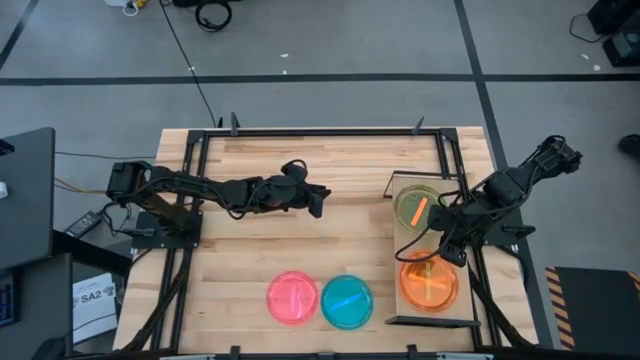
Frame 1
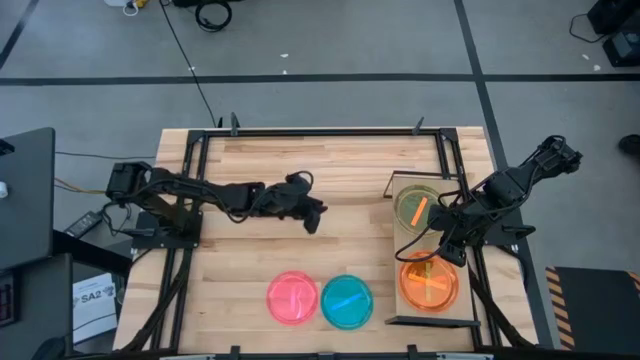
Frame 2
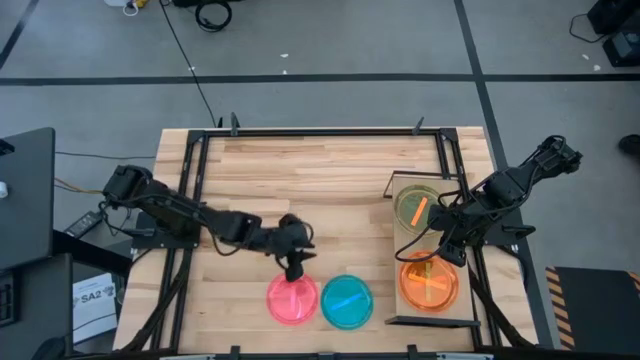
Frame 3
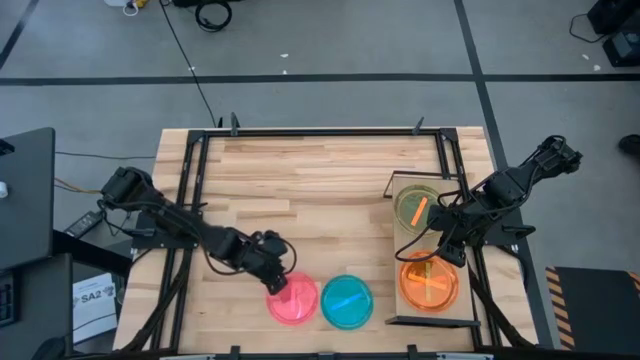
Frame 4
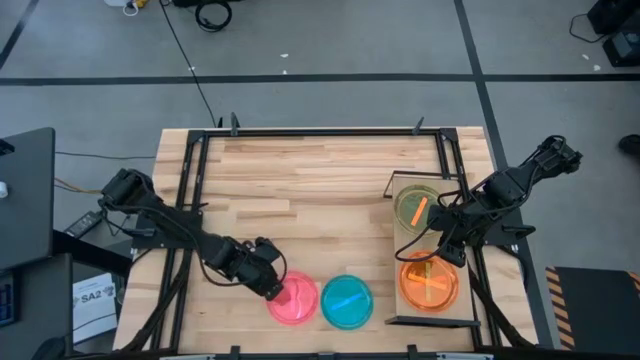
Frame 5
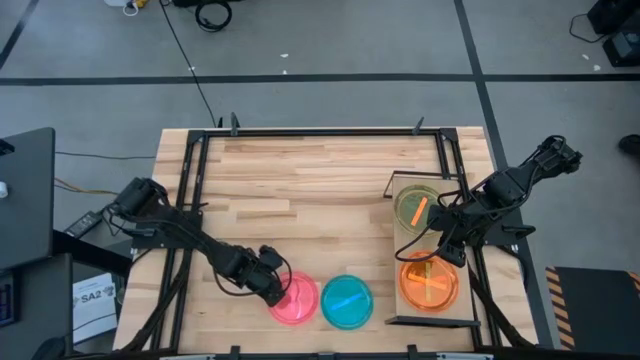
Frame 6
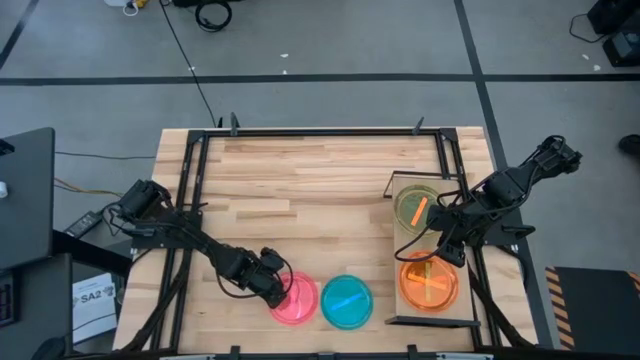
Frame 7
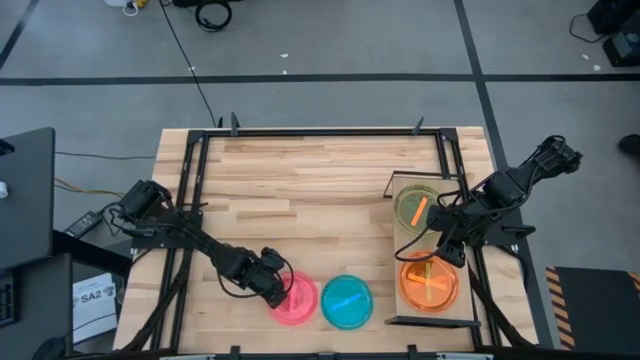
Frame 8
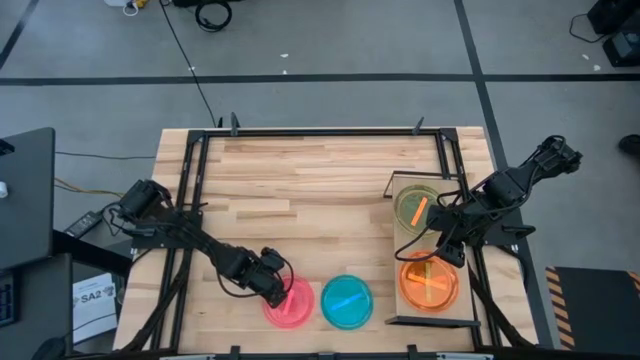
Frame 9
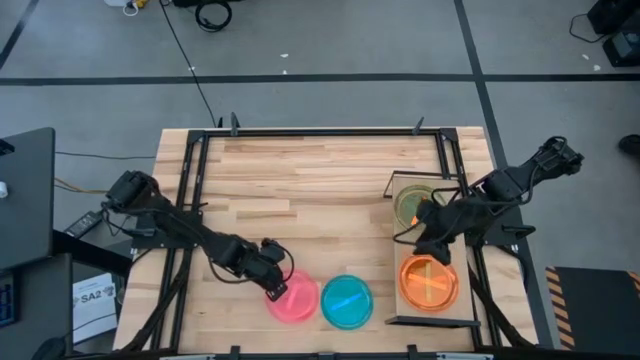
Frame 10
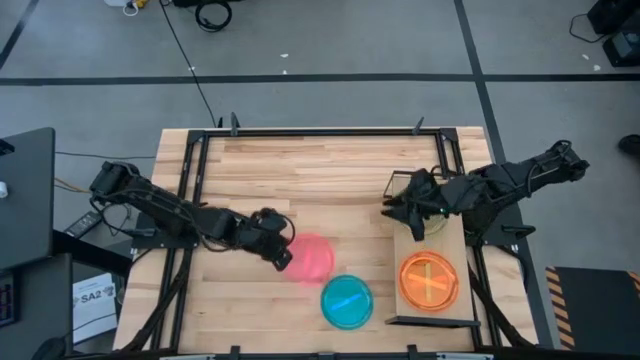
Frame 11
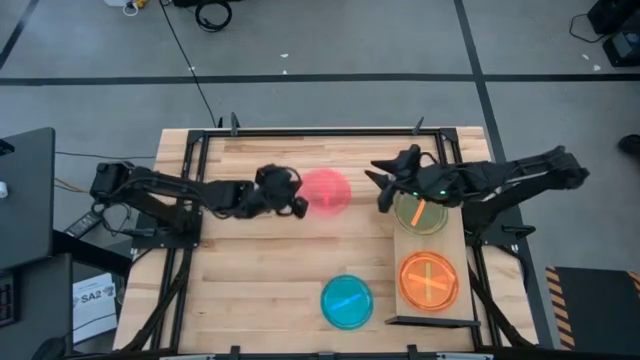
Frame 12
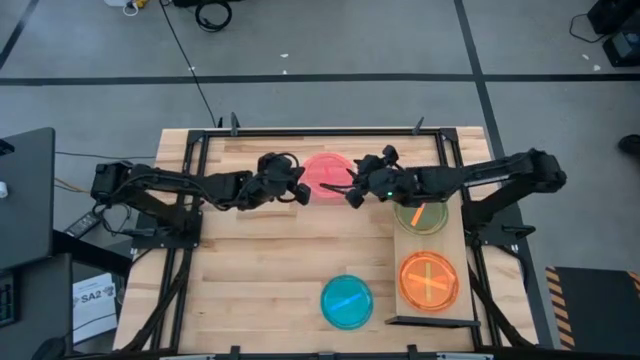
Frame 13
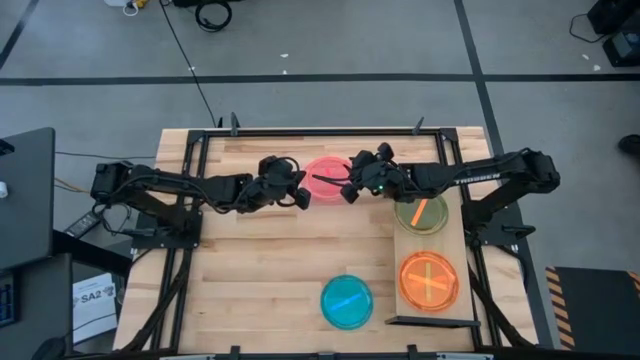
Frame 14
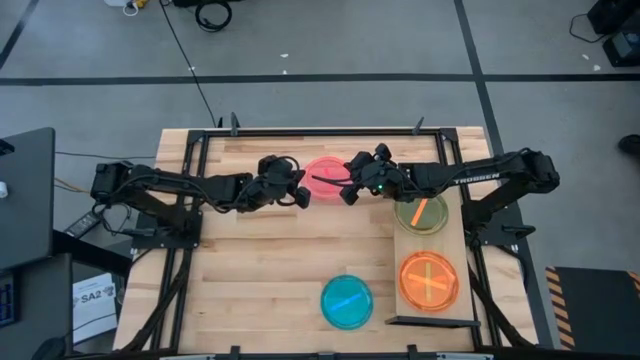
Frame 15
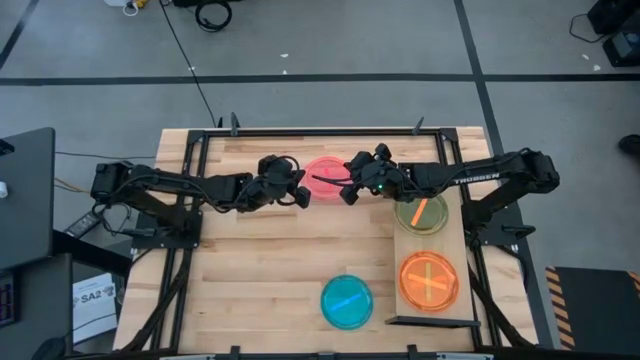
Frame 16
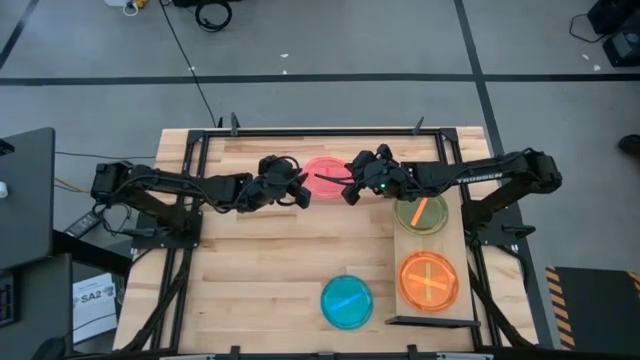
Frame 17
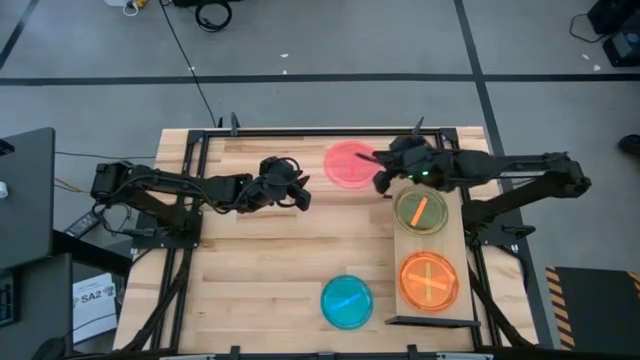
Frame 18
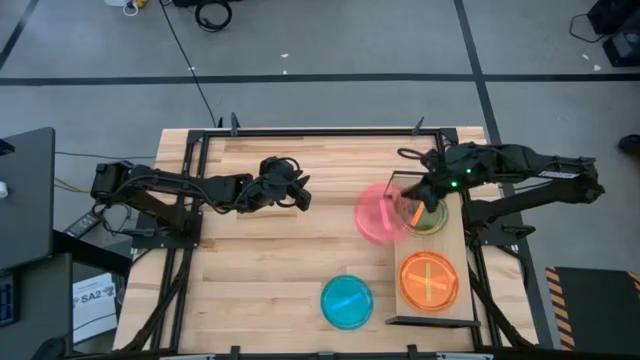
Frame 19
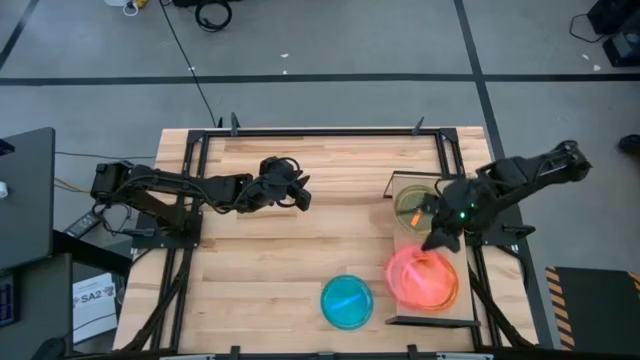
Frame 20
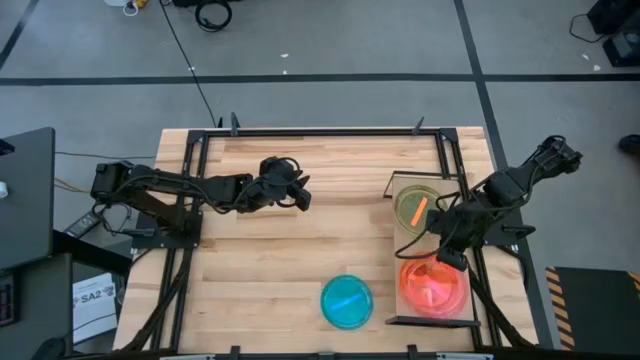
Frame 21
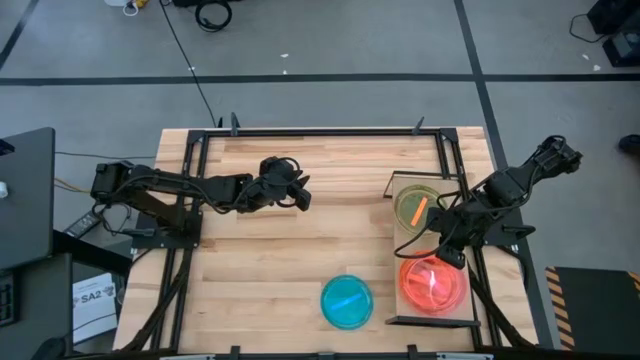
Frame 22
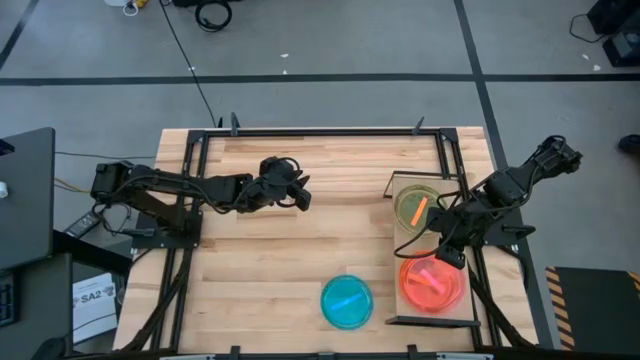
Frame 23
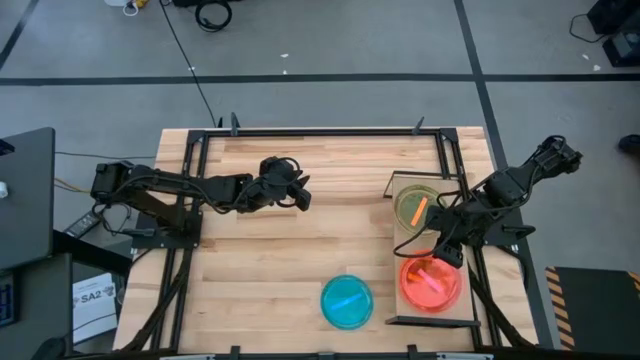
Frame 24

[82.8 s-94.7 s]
Task: Place and stack plates onto a shelf
Stack the pink transparent plate on top of the bottom orange transparent plate on the shelf

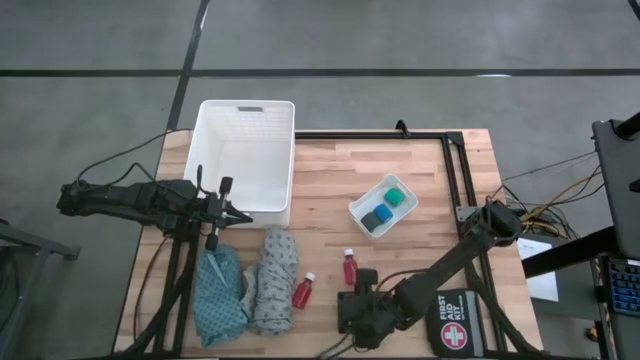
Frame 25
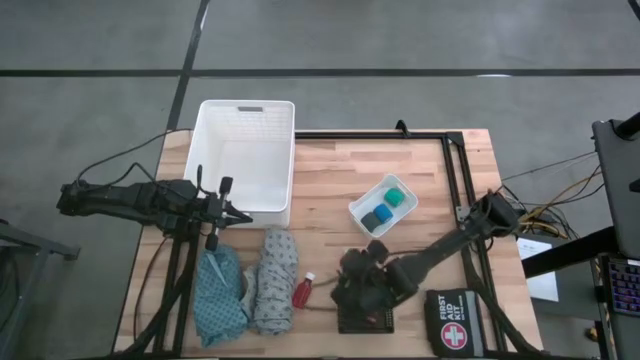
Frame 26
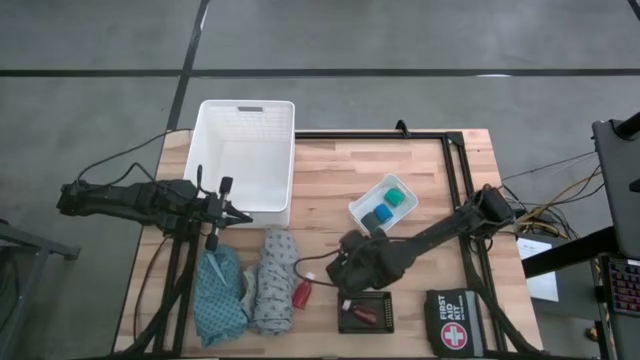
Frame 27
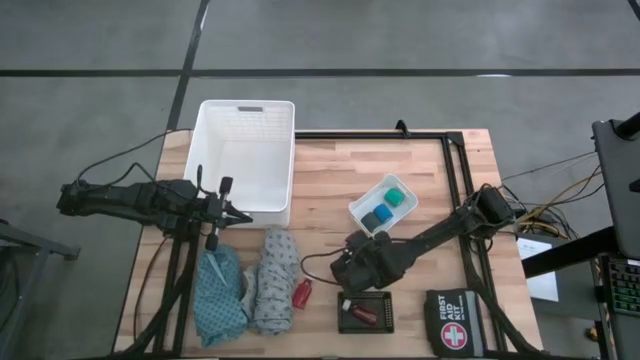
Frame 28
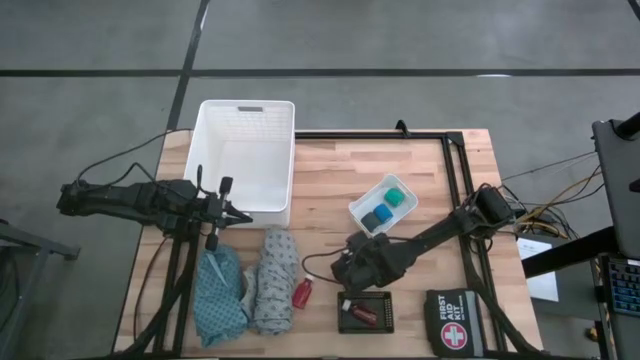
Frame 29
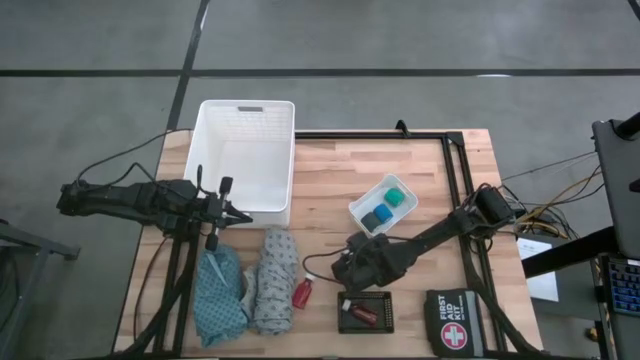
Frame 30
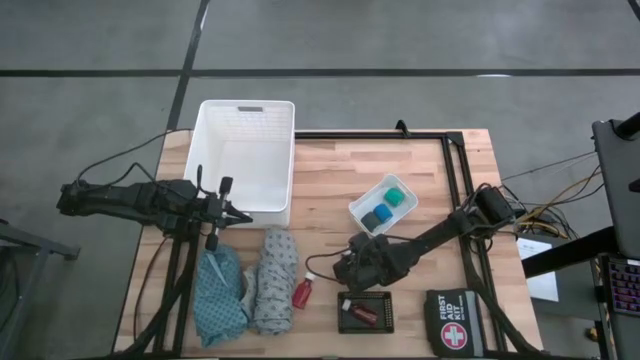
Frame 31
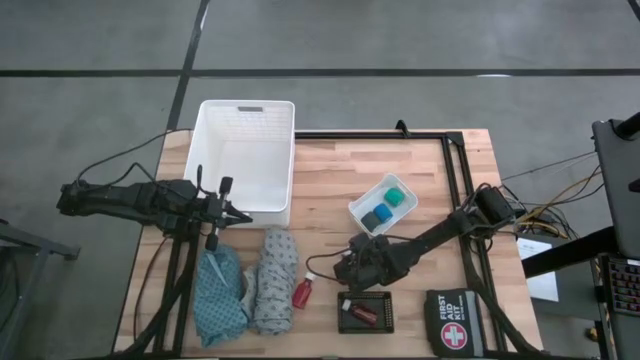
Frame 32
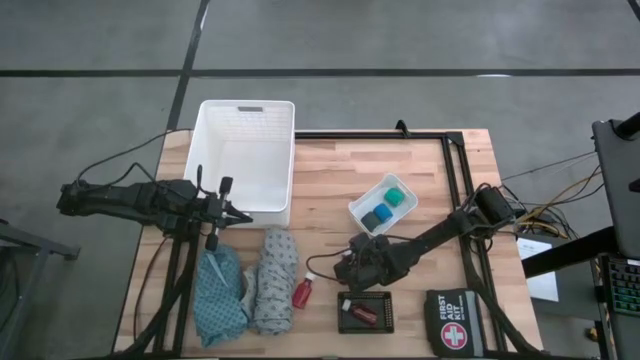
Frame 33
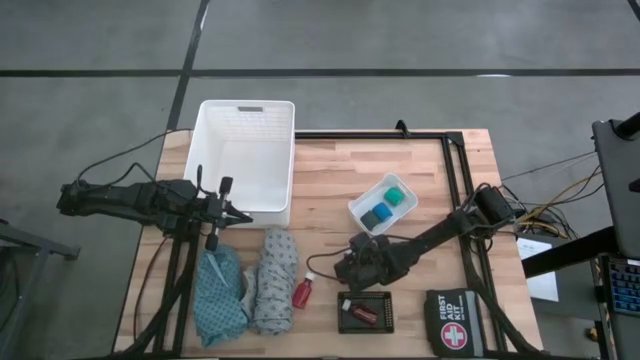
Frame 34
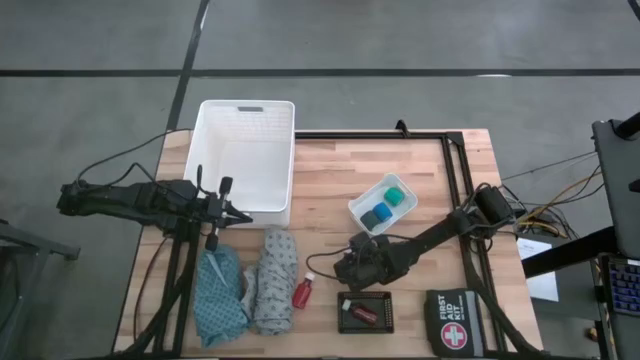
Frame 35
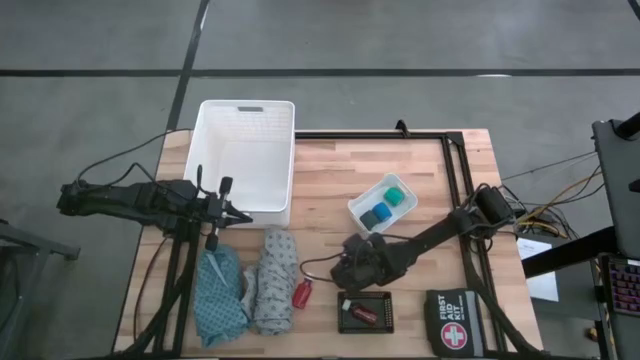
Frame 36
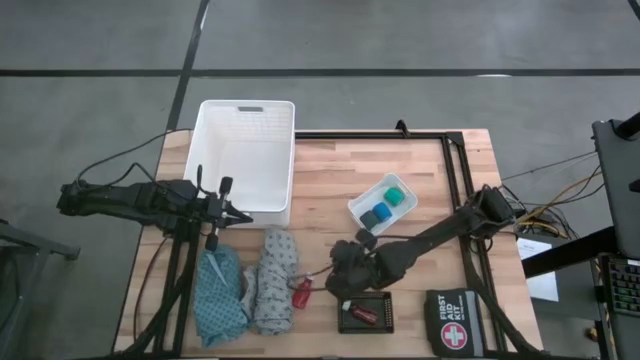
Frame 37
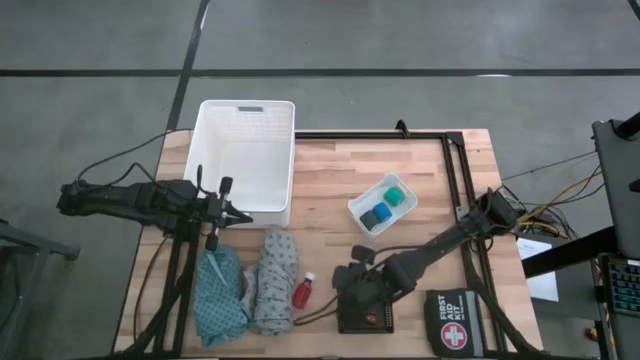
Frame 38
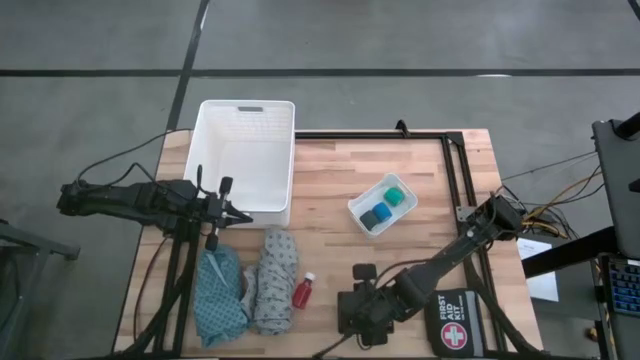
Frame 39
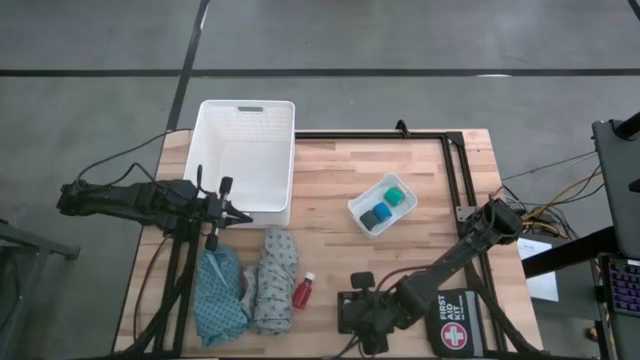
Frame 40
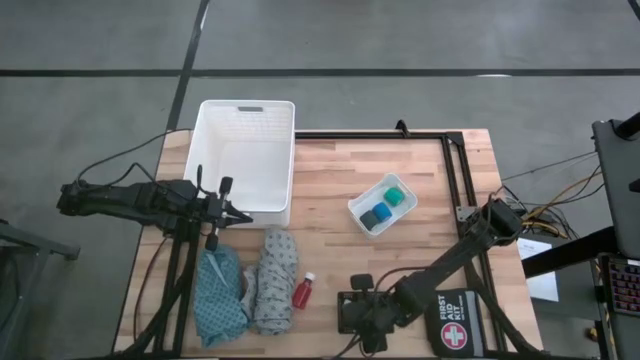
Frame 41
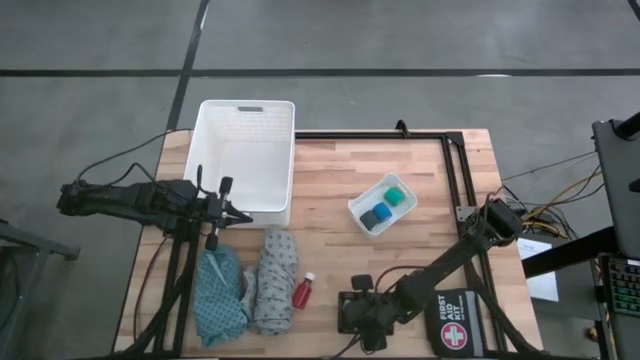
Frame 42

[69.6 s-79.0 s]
Task: Pick & place medical supplies in basket/bin
Put the right red pill bottle into the black bin
